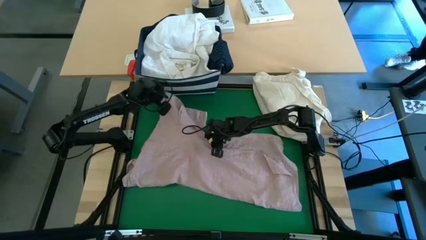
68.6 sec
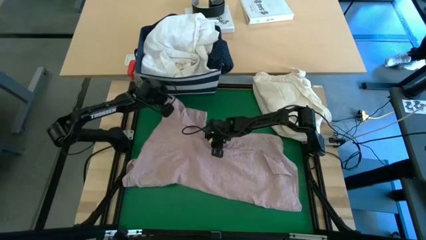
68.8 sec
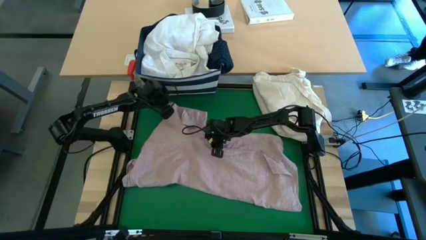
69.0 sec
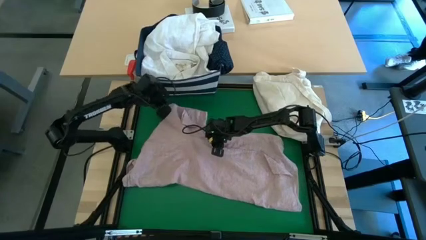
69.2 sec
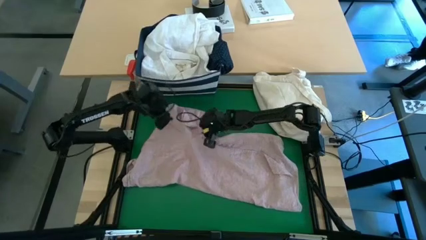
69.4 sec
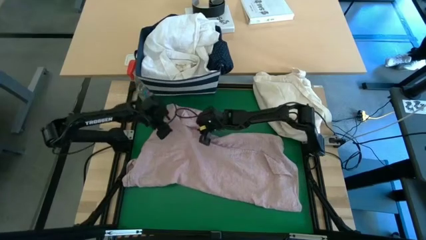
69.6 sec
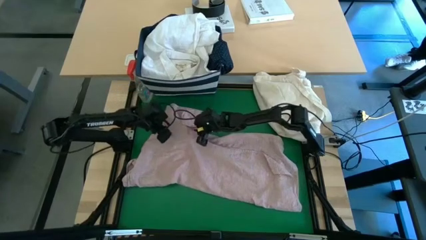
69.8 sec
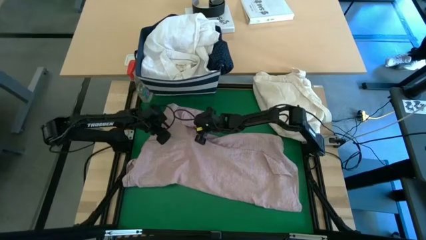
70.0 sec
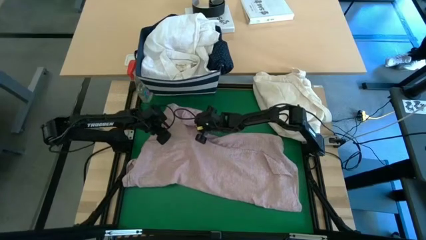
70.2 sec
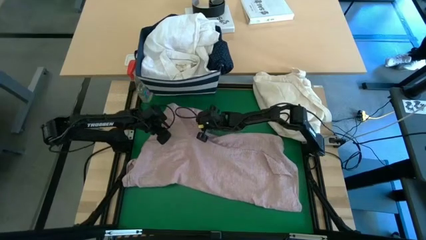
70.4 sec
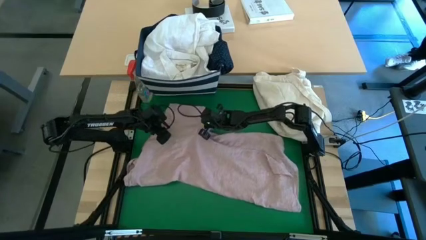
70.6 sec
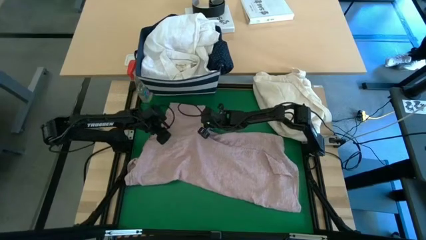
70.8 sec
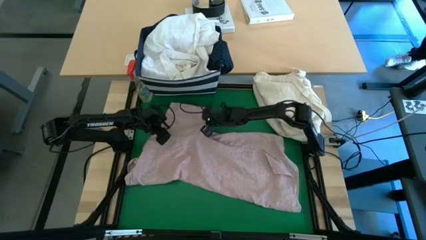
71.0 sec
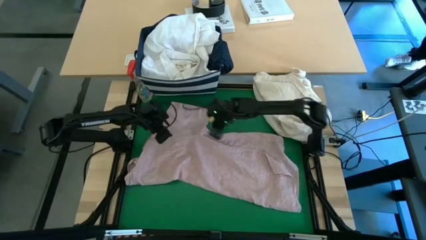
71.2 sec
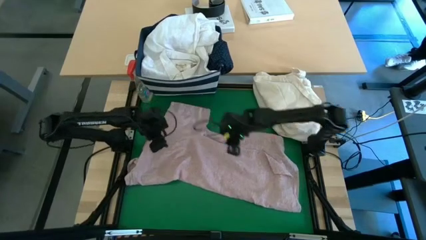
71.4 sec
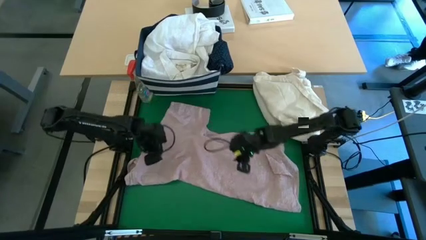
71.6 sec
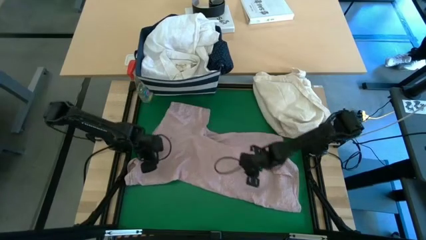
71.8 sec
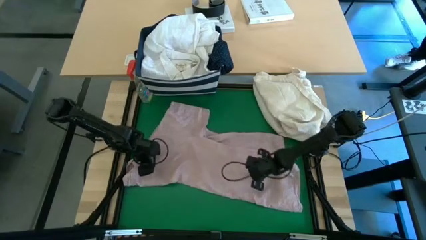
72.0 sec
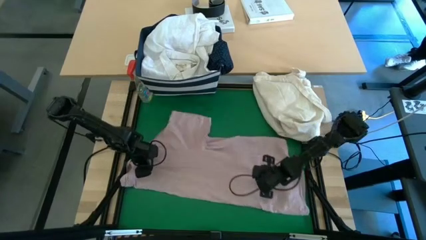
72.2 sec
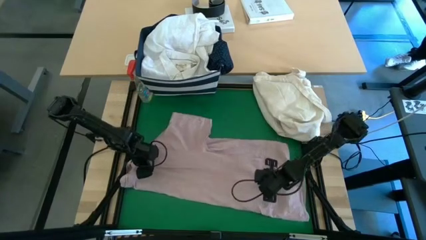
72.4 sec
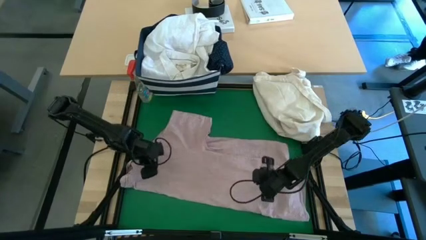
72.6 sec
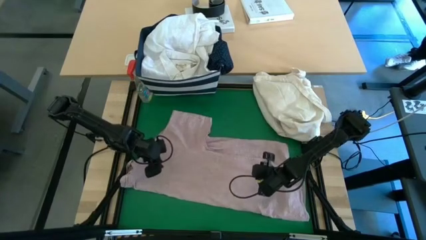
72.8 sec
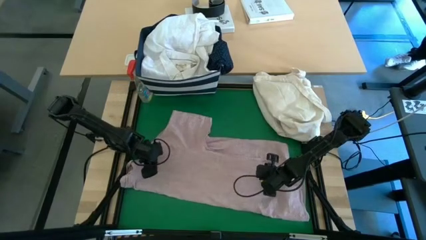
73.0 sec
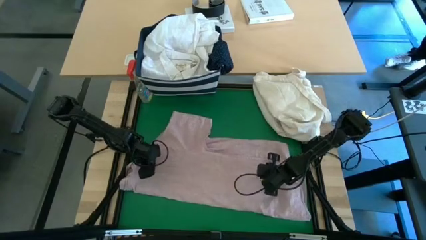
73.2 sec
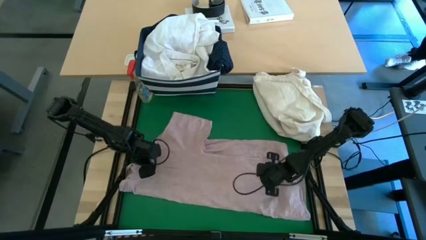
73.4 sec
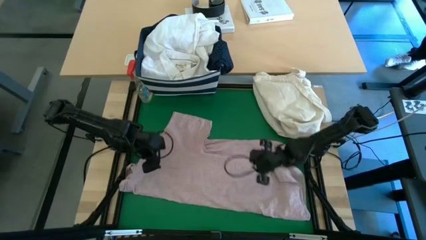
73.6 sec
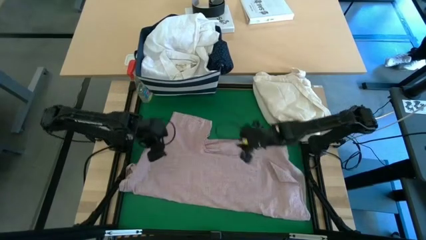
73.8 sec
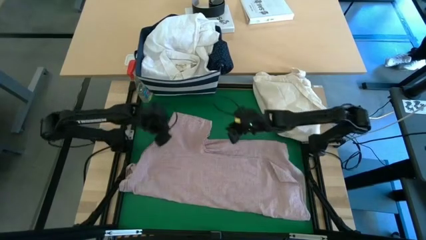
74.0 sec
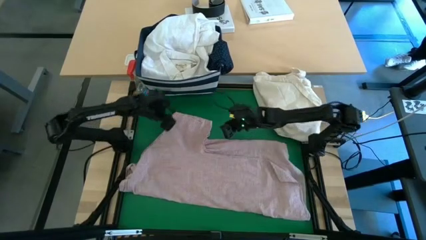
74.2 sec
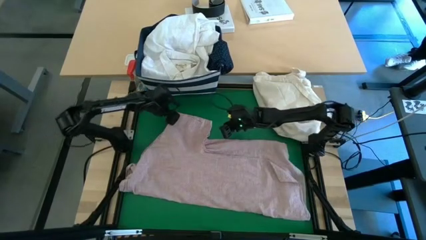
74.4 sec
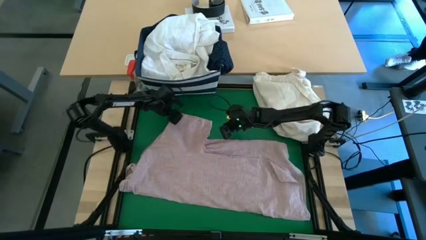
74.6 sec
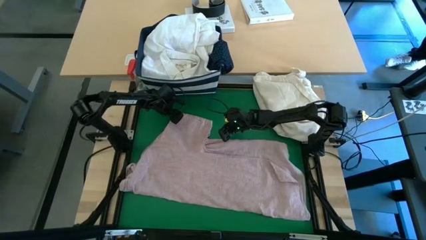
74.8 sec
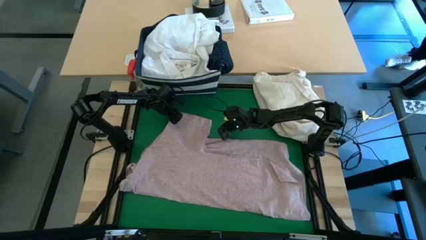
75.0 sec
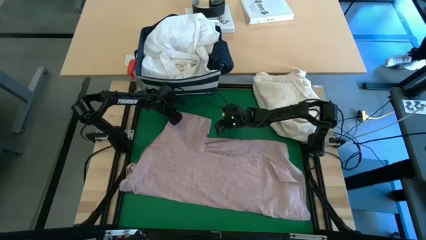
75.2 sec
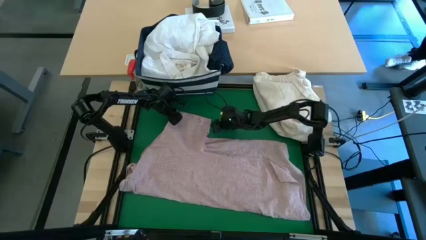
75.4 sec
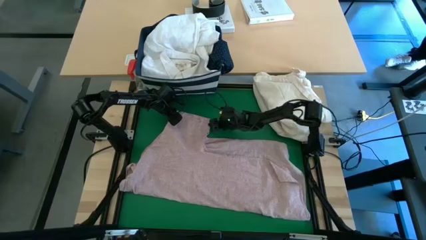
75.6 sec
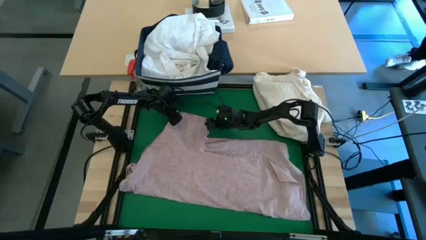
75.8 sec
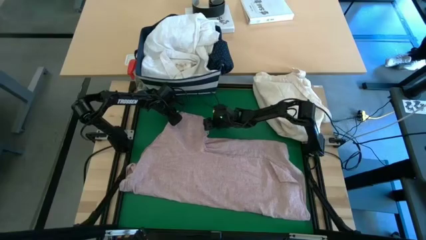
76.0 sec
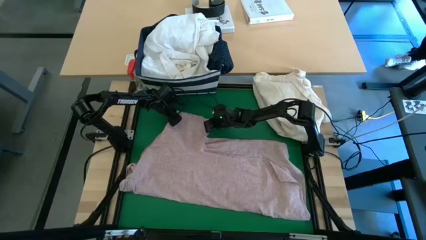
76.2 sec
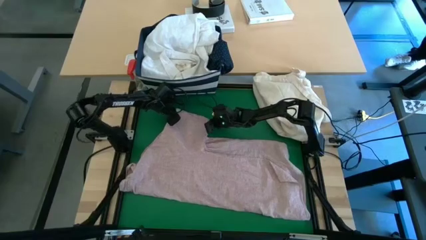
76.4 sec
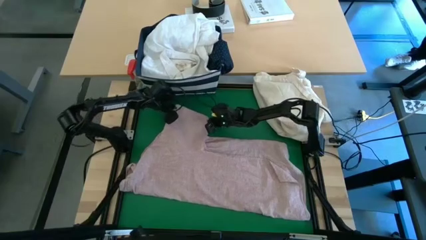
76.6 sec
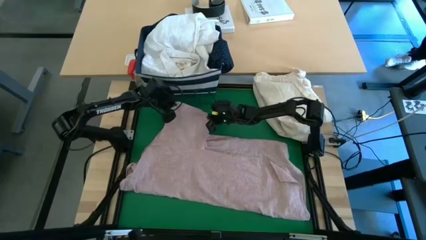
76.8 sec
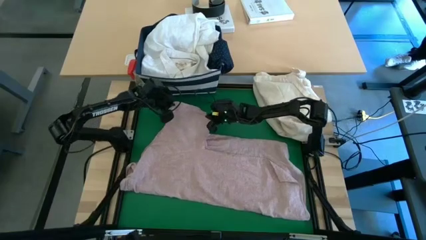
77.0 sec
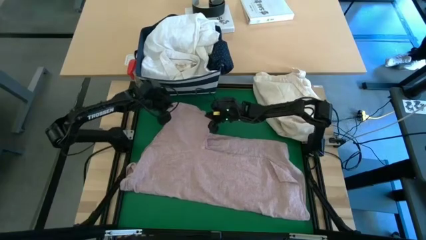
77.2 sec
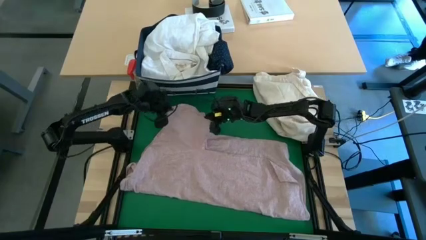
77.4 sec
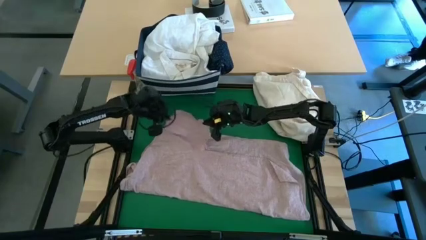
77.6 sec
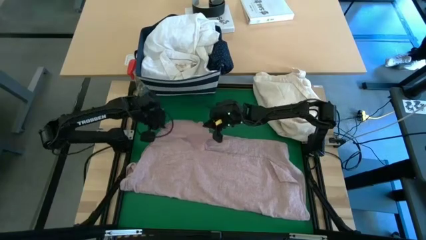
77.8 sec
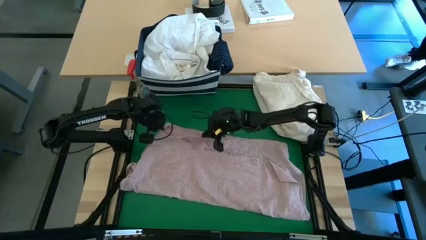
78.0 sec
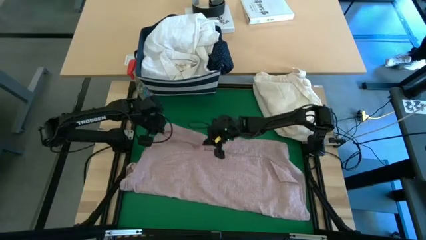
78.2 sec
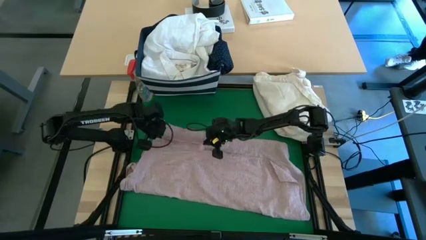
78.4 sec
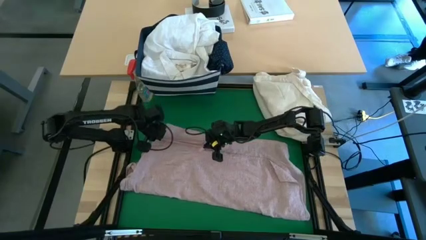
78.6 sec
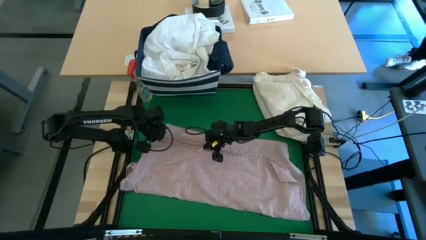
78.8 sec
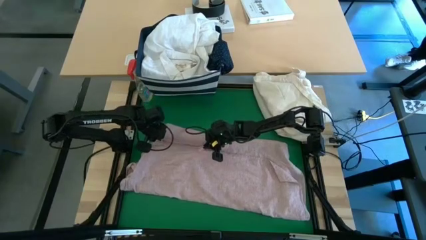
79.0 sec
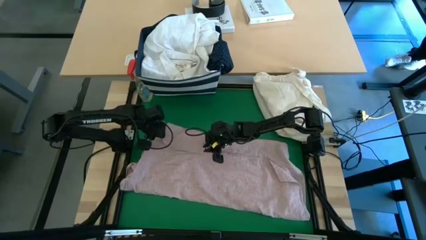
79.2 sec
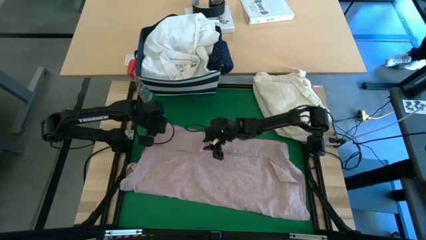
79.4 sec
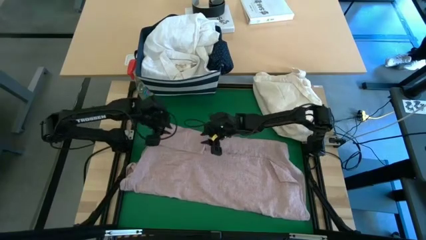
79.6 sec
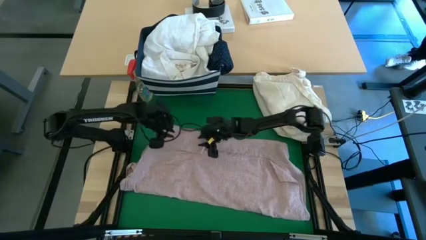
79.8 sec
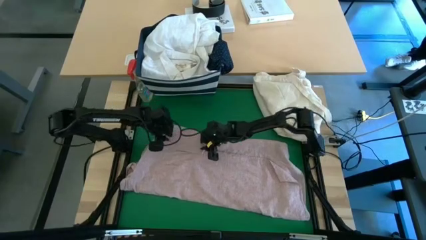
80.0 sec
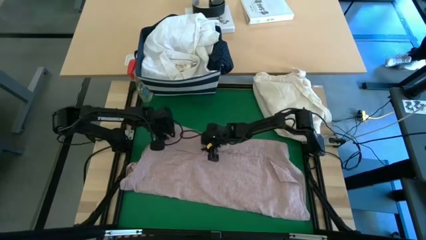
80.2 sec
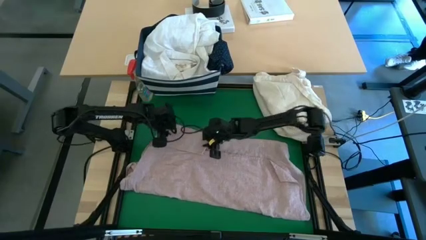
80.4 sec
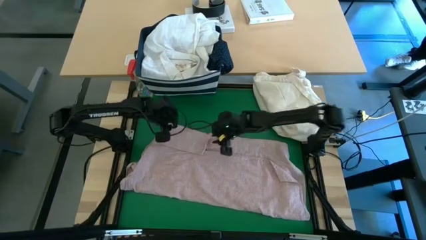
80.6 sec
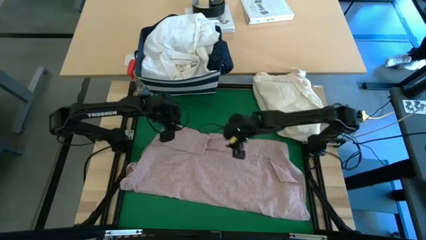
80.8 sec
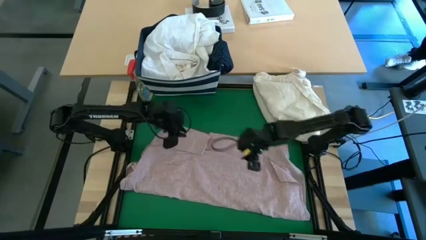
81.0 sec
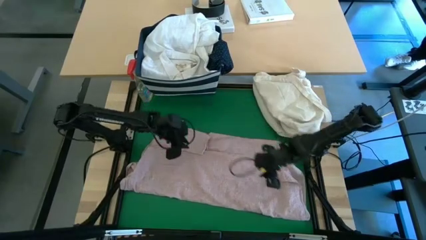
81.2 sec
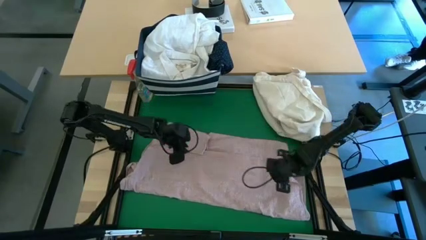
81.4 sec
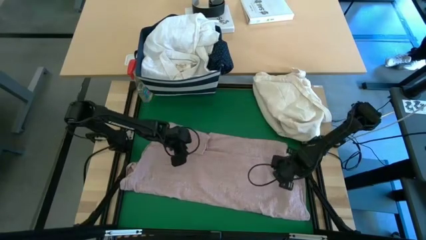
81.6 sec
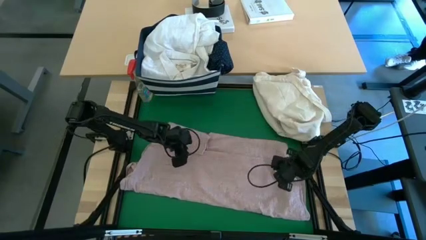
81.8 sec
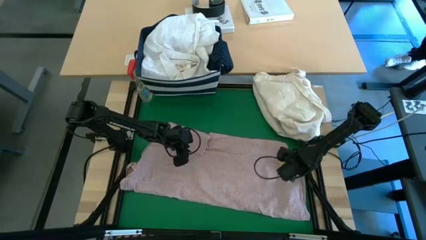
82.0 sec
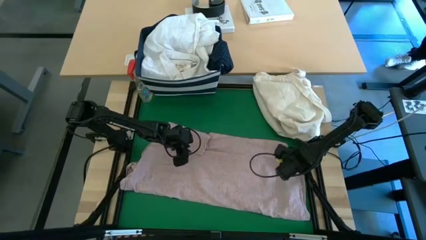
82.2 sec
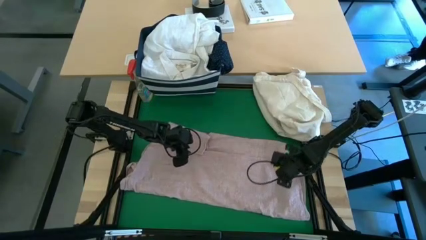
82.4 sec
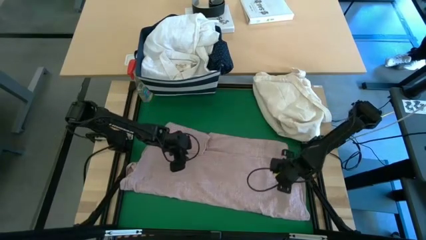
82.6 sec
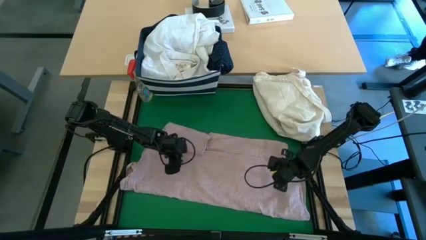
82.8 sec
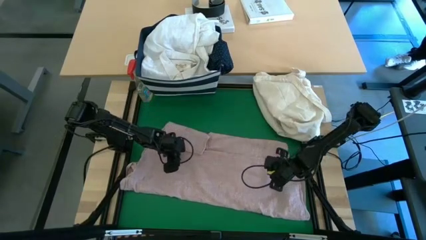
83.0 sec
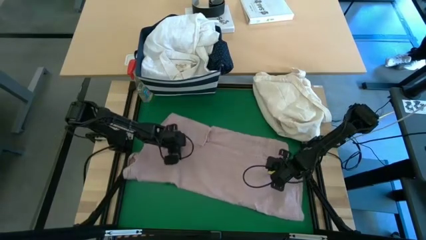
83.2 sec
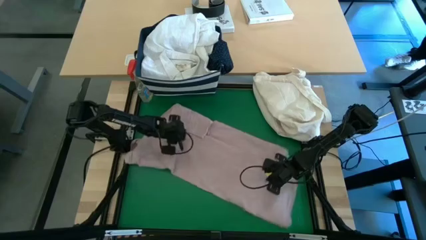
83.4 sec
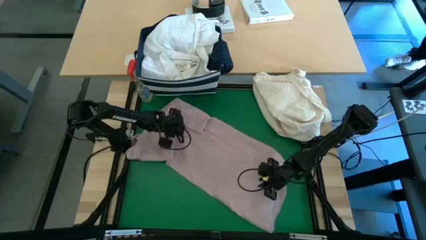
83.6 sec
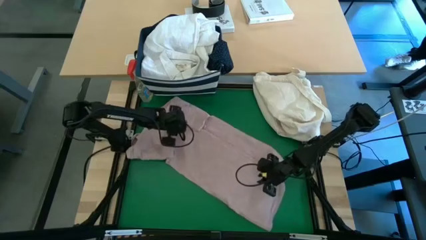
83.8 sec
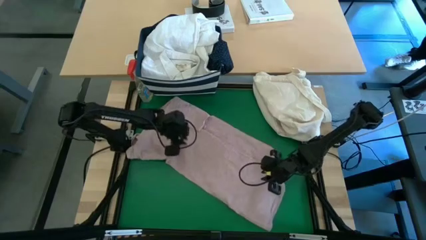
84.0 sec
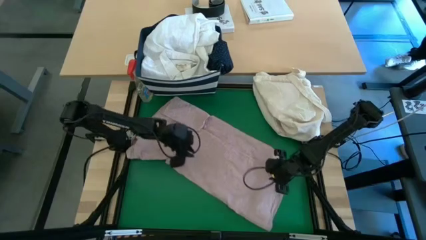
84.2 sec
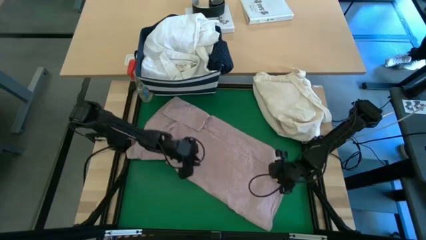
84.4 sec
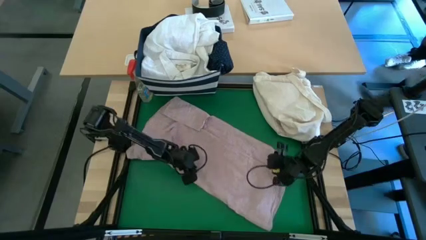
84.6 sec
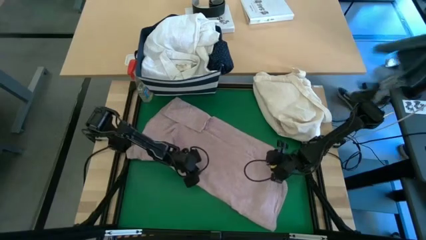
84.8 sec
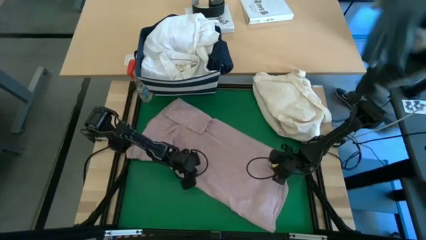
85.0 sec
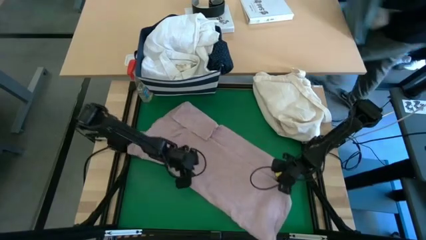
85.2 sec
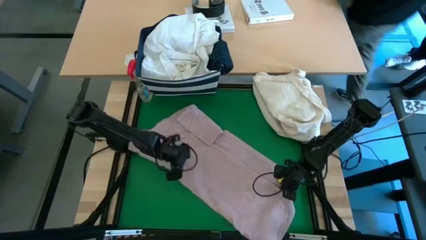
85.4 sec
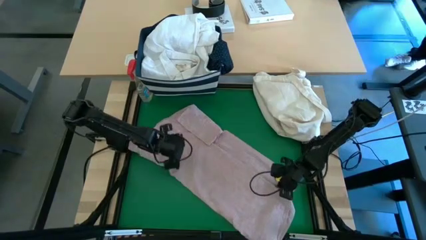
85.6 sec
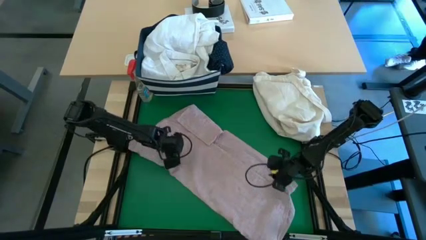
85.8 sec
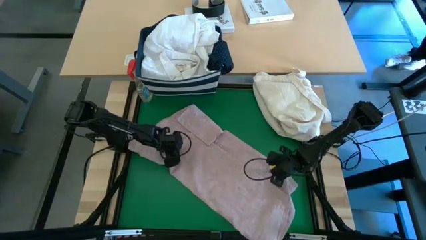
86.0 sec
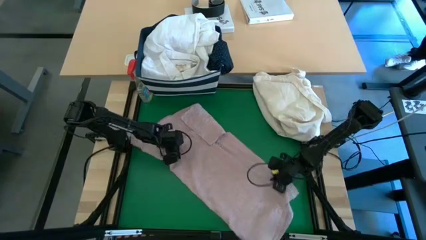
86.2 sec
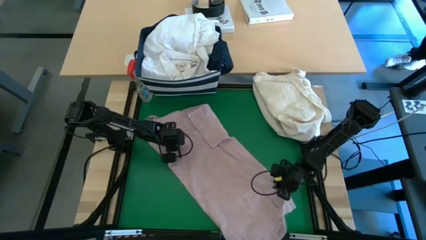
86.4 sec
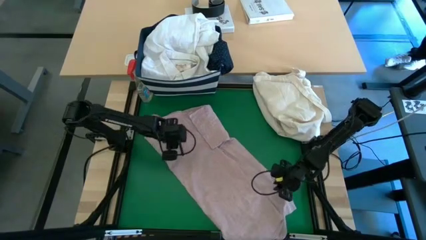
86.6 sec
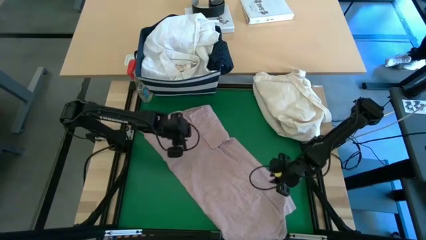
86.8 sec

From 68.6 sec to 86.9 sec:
Task: Fold laundry
Fold the red polo
